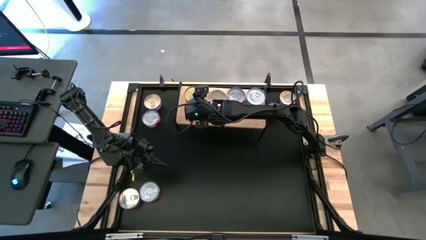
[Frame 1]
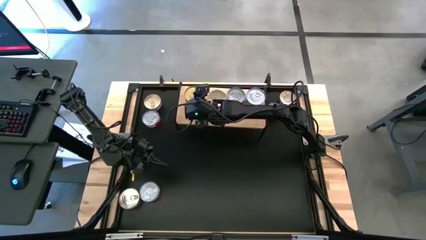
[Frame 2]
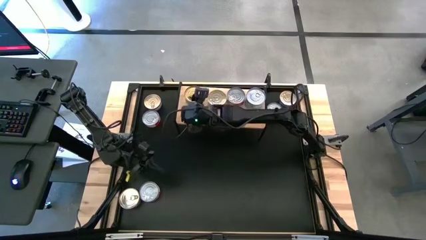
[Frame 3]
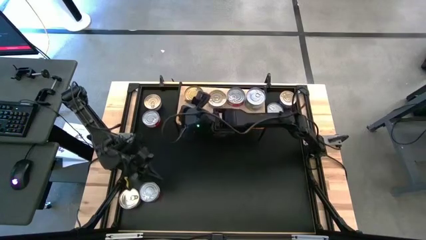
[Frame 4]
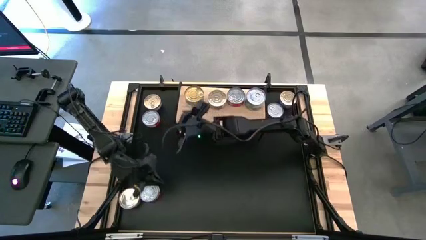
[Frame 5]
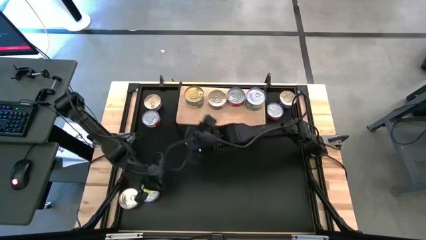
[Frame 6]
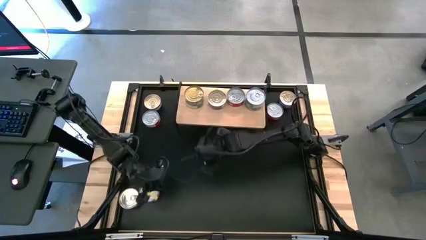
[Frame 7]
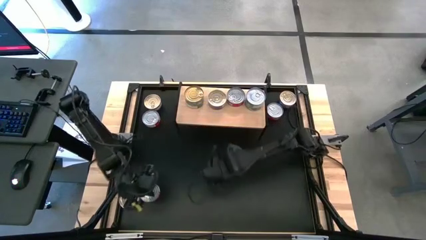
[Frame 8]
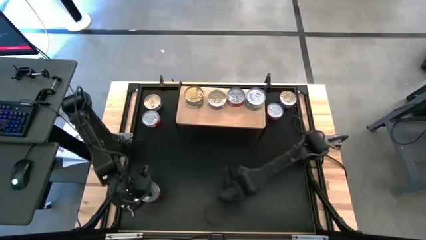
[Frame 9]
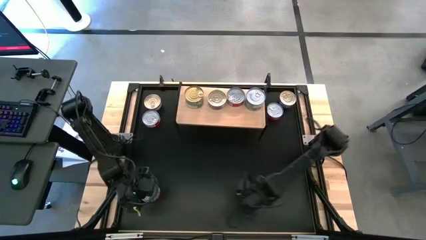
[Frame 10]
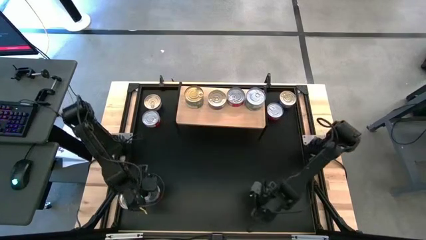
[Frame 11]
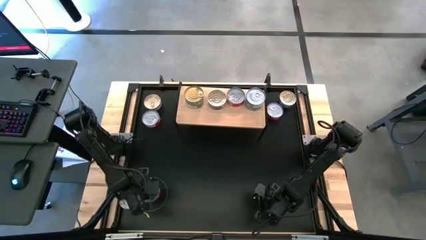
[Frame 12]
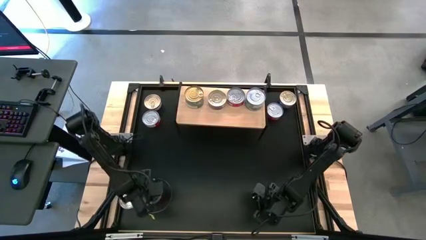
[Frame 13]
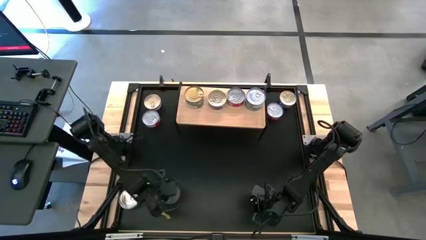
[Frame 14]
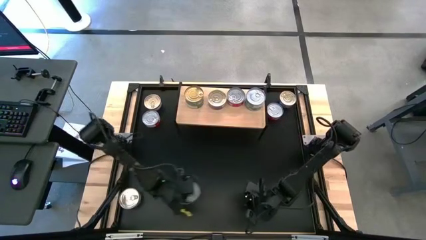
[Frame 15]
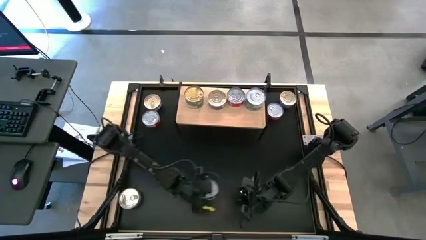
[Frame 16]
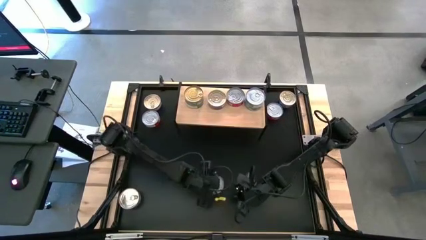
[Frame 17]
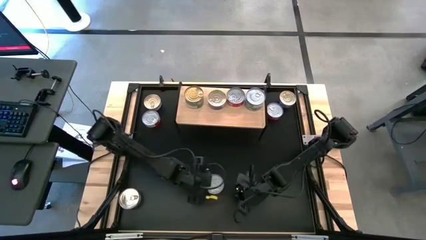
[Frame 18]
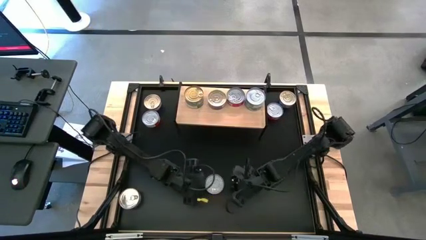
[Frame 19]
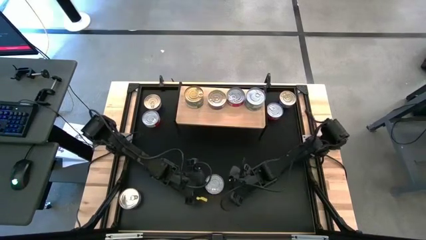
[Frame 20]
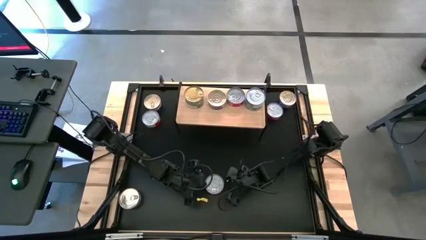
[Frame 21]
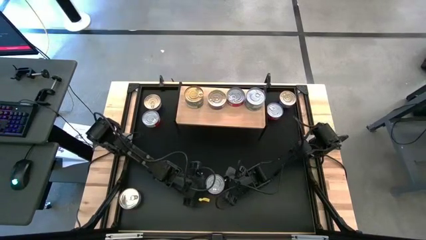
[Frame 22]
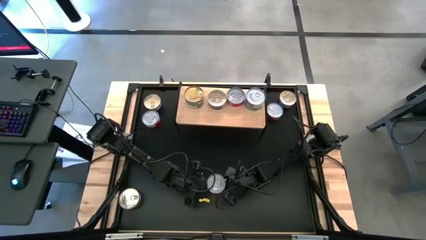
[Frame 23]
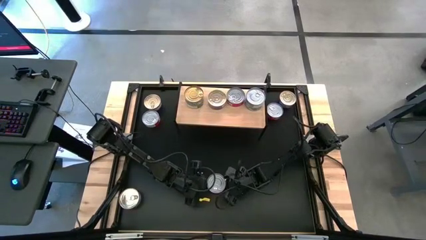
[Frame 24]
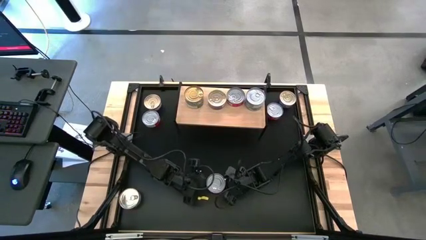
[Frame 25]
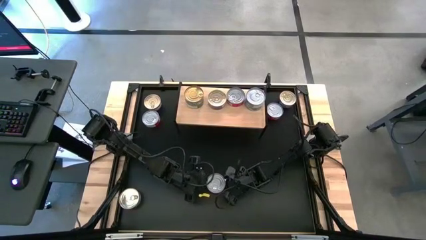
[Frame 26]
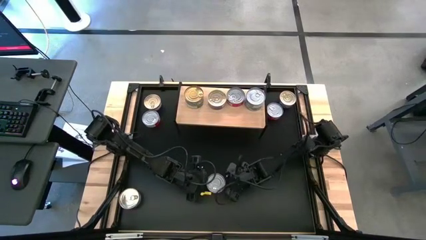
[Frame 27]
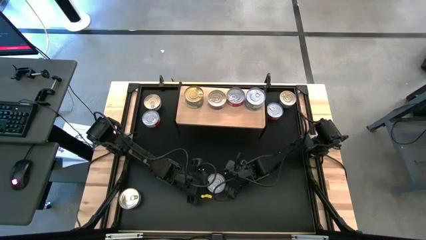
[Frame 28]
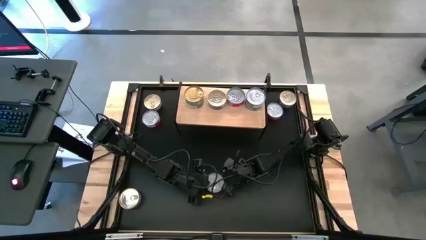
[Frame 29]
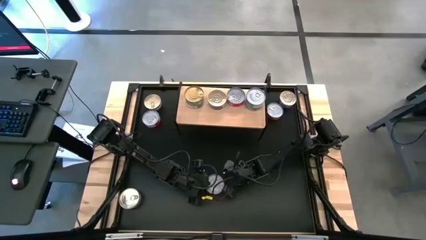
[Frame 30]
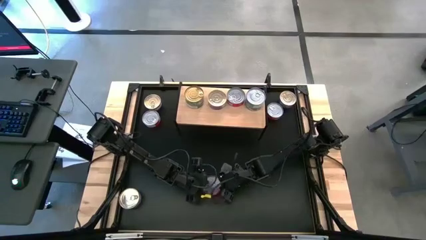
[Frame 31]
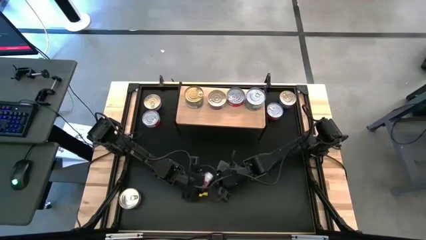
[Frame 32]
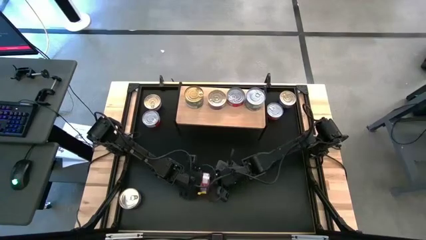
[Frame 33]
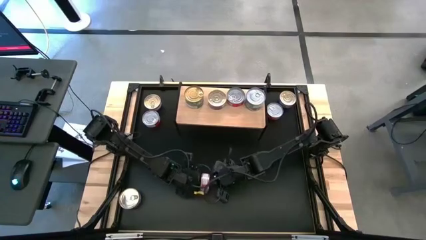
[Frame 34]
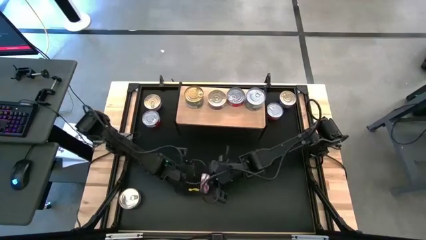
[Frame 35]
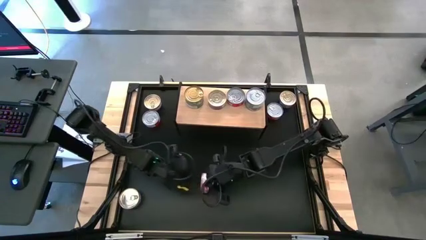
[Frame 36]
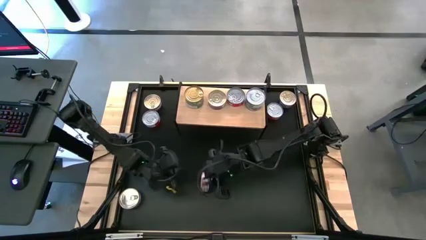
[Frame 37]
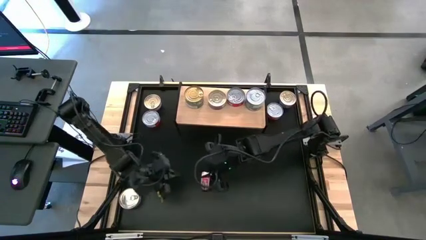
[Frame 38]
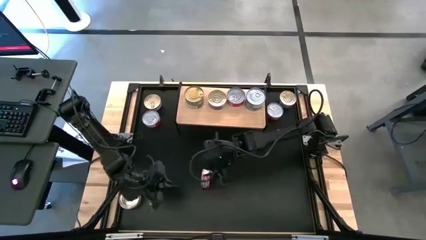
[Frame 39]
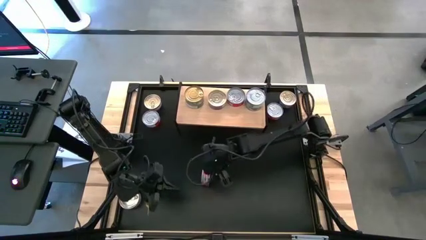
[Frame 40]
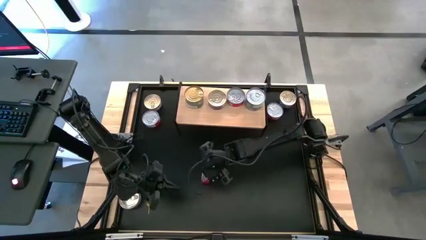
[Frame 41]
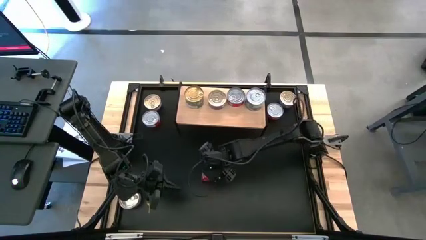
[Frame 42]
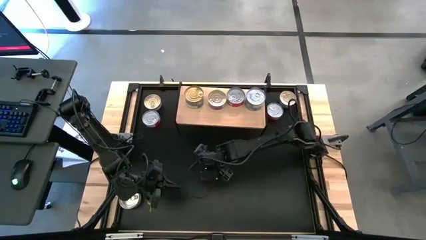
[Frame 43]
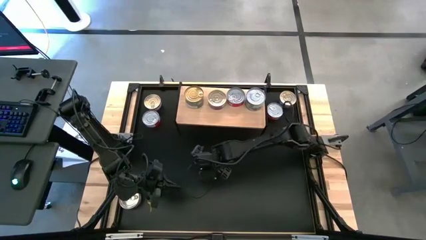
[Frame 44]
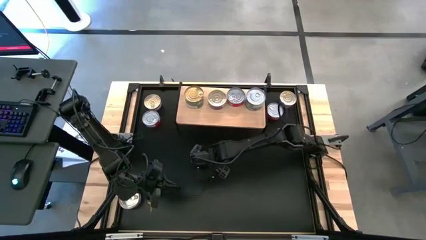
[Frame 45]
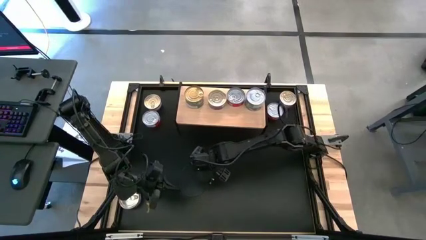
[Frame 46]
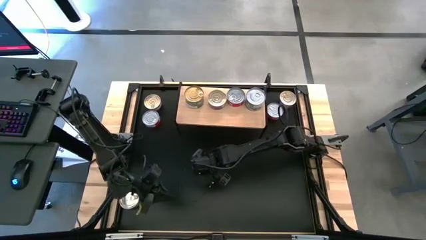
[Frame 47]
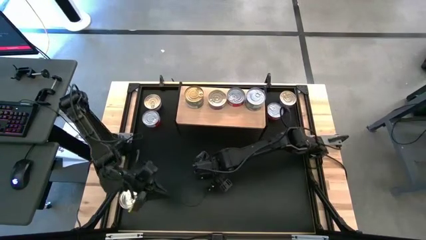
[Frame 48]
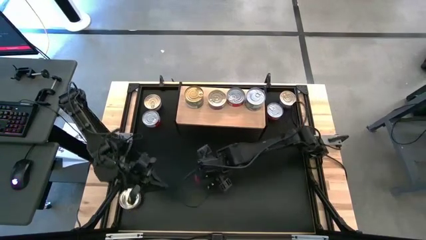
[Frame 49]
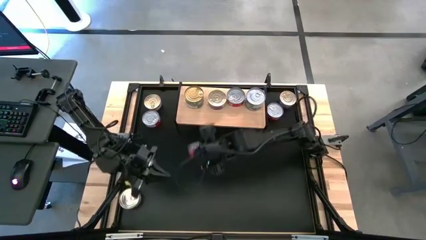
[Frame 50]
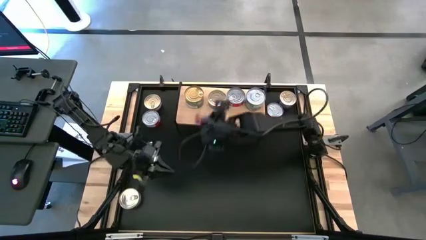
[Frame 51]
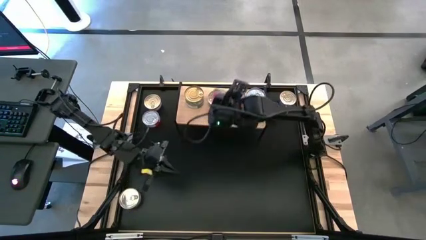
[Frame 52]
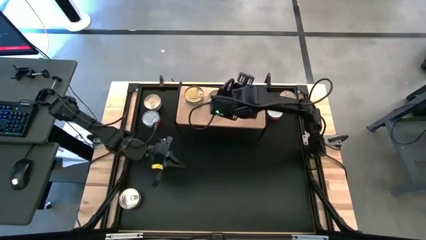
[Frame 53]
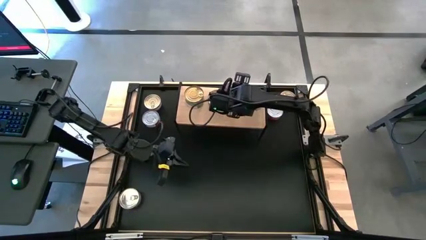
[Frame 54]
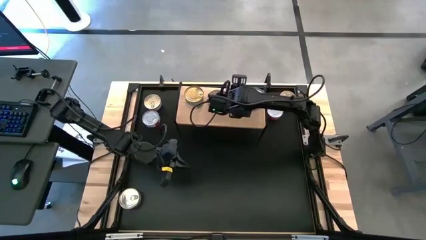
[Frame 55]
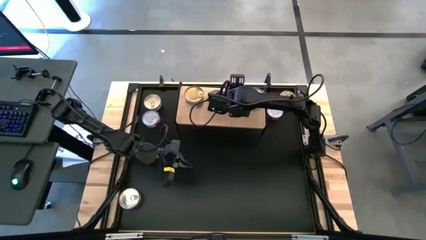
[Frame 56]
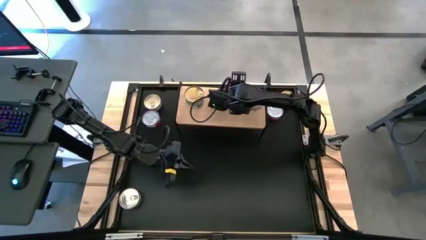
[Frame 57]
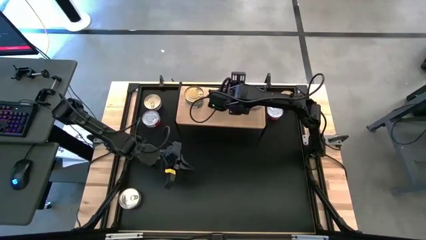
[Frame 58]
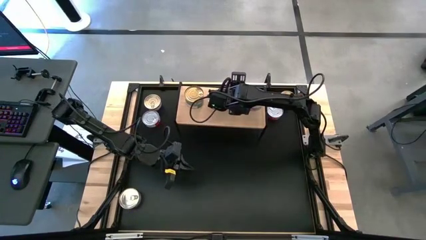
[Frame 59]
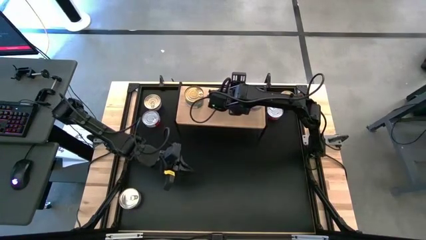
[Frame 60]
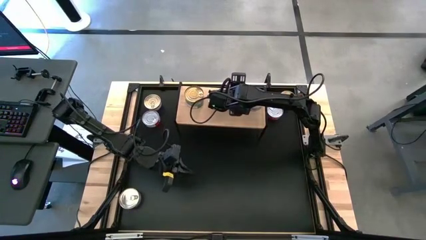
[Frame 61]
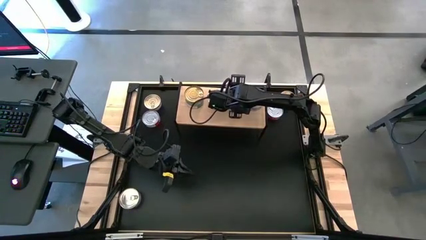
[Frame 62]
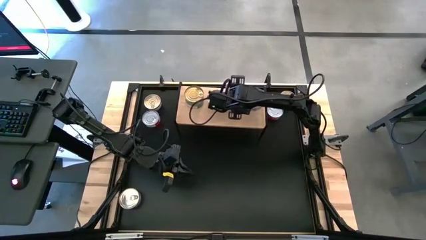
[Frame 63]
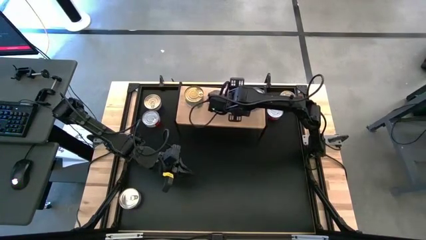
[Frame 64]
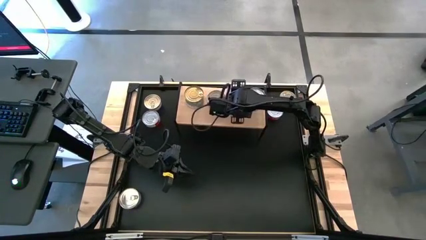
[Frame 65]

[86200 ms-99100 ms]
Task: Stack canned seafood by type on shelf
Stack the red tuna can on top of the red tuna can on the shelf

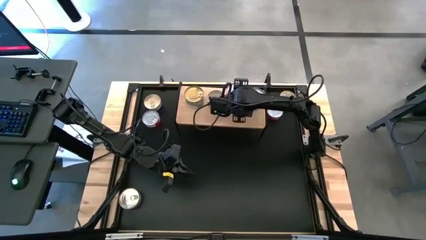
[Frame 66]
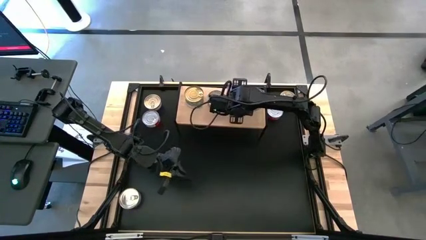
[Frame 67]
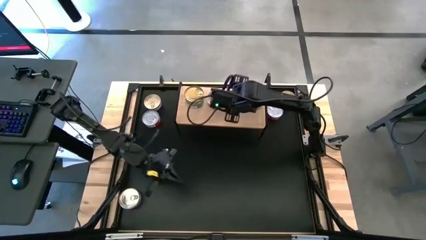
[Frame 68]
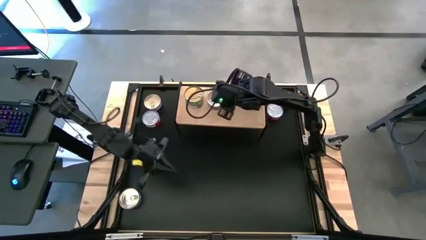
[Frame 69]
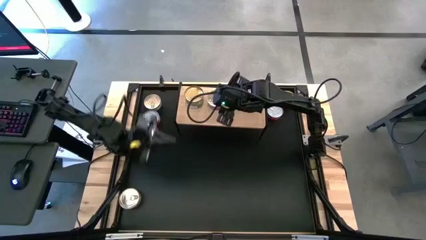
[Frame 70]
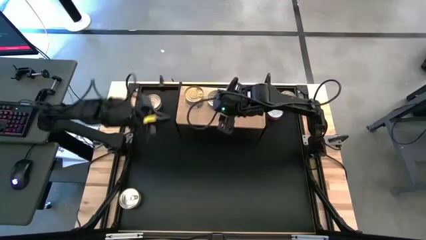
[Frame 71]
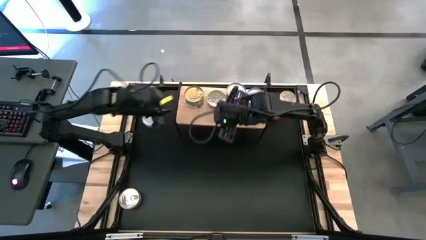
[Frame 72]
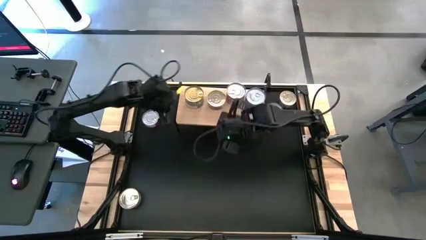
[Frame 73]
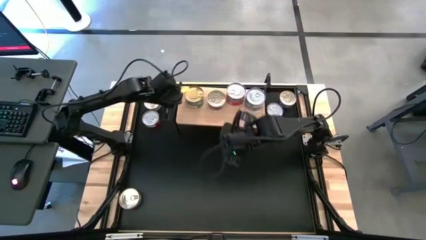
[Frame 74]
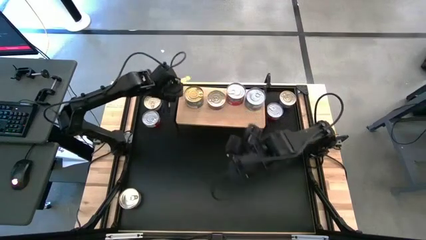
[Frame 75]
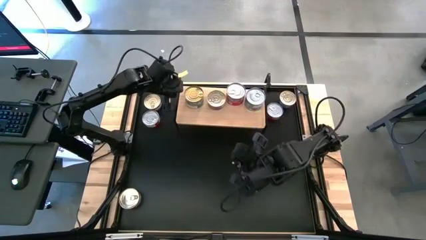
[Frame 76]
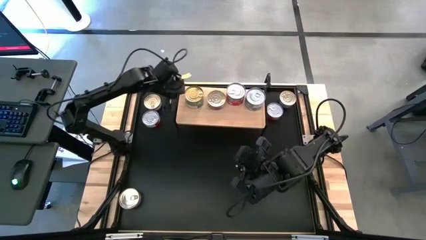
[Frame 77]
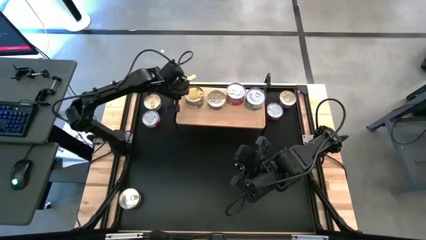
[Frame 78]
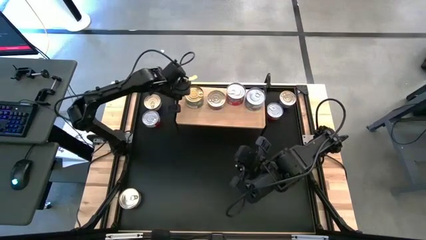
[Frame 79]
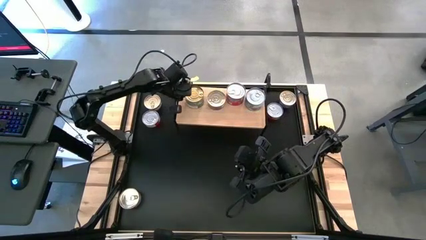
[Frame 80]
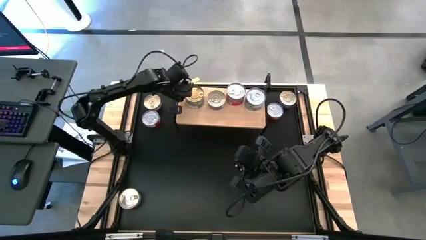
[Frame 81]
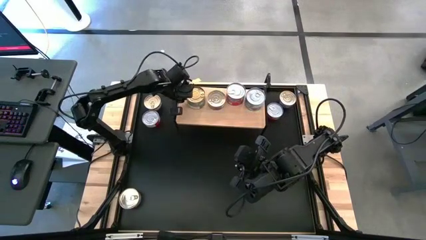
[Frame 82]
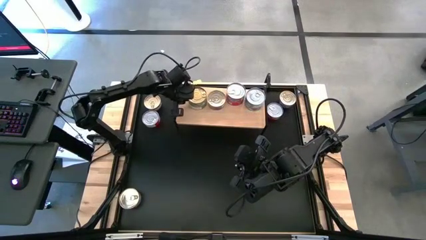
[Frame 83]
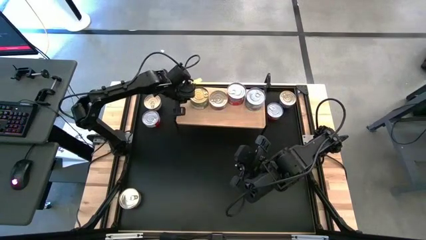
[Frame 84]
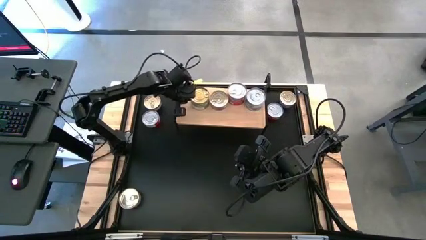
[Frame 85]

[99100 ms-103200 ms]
Adjust the stacked green tuna cans on the shelf
